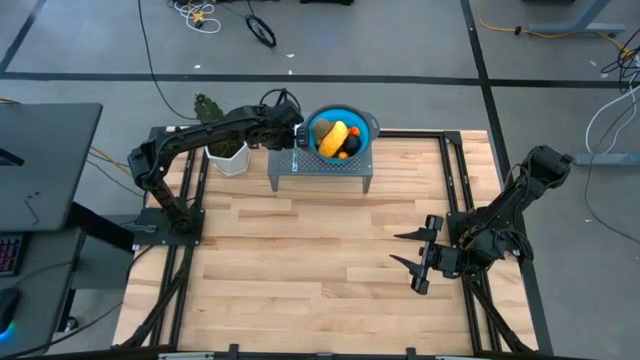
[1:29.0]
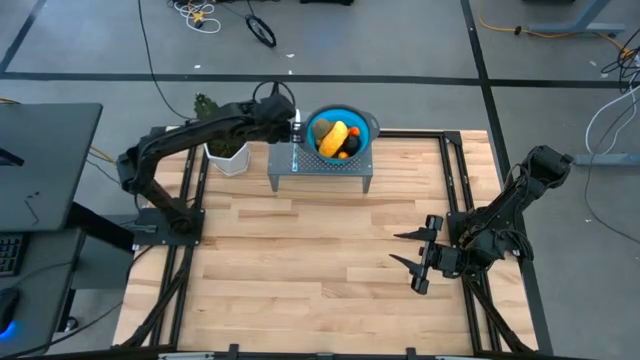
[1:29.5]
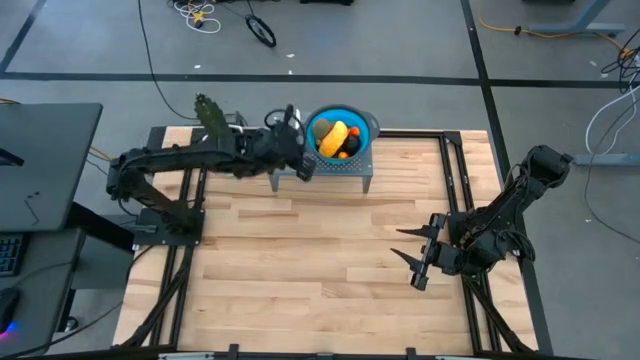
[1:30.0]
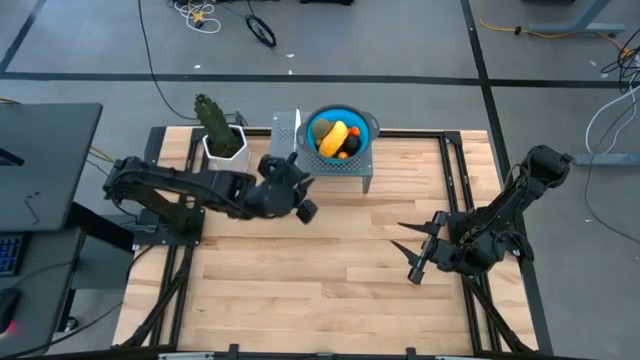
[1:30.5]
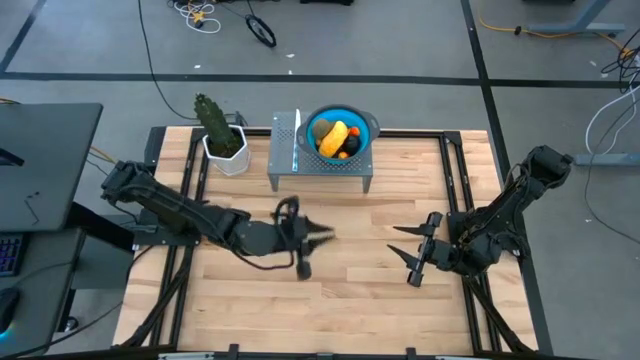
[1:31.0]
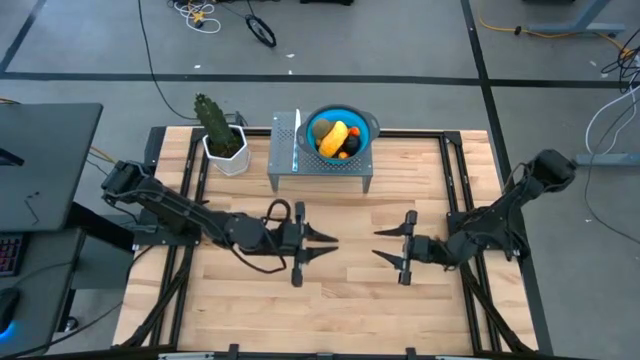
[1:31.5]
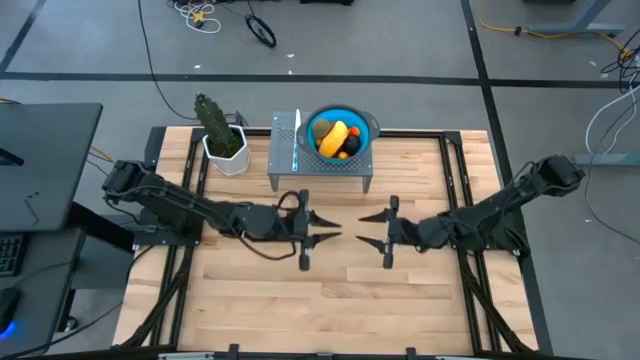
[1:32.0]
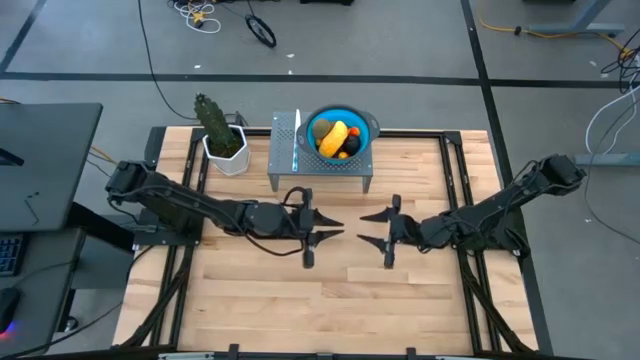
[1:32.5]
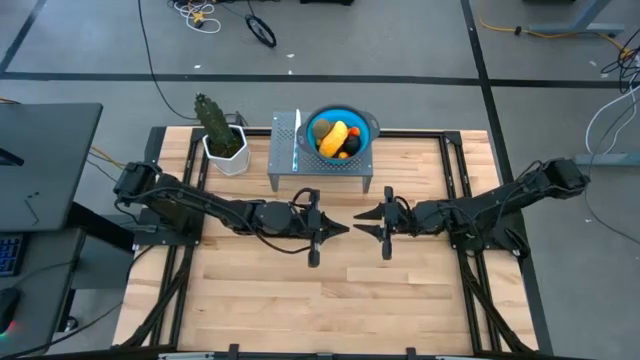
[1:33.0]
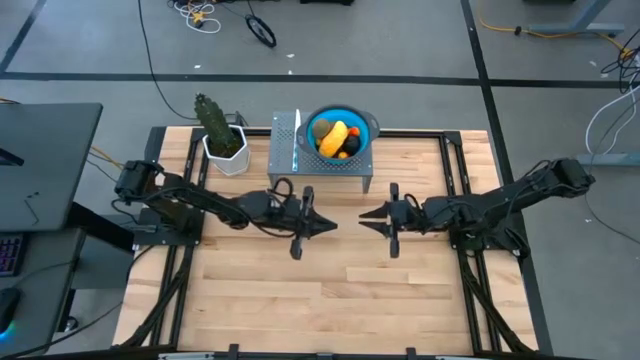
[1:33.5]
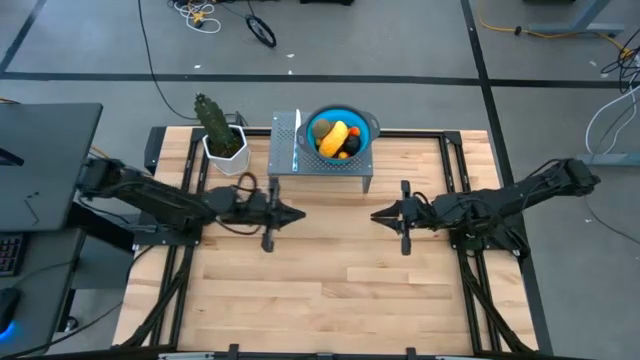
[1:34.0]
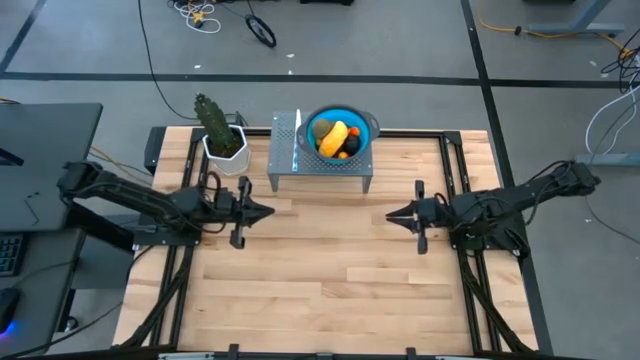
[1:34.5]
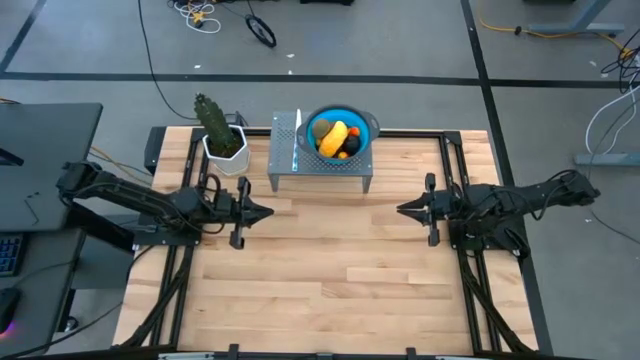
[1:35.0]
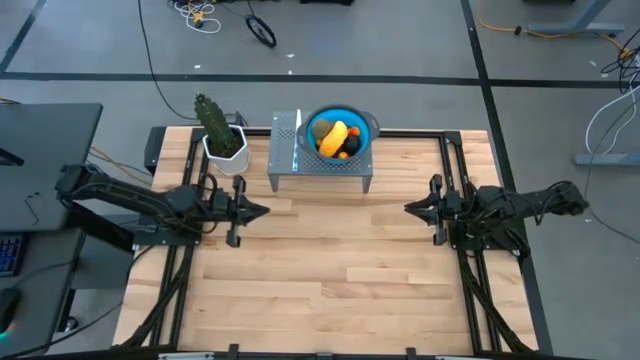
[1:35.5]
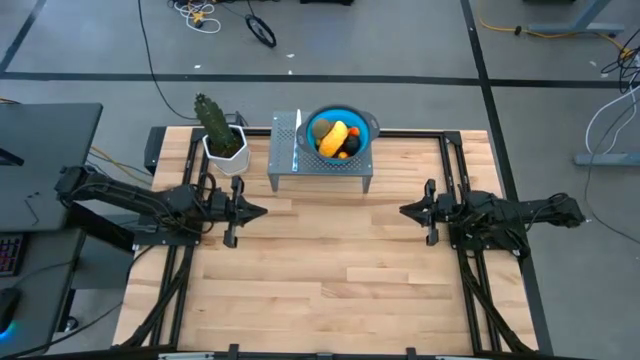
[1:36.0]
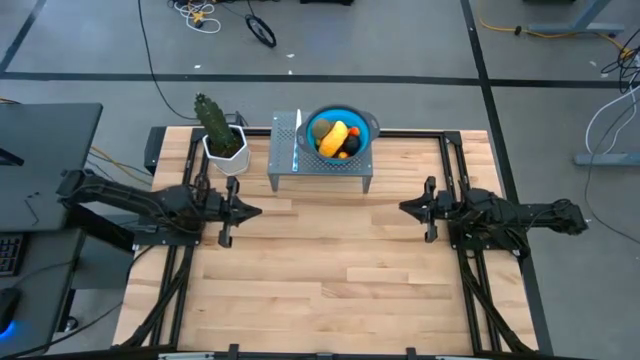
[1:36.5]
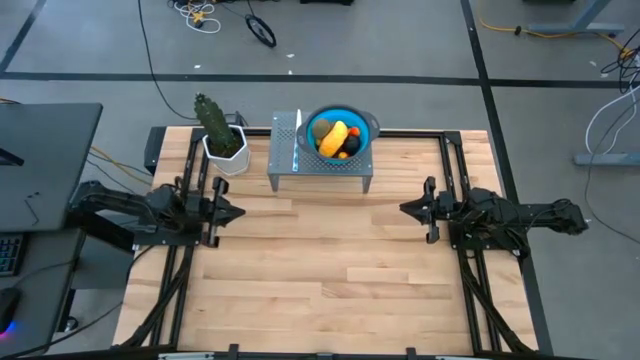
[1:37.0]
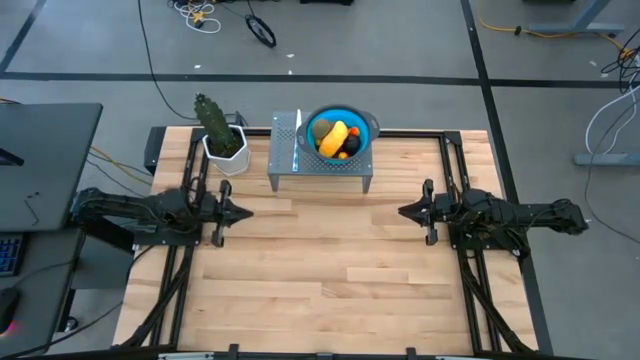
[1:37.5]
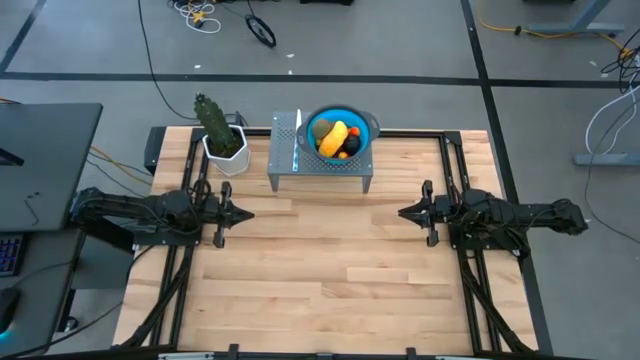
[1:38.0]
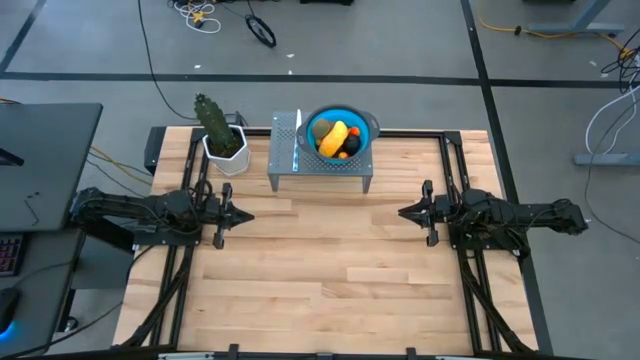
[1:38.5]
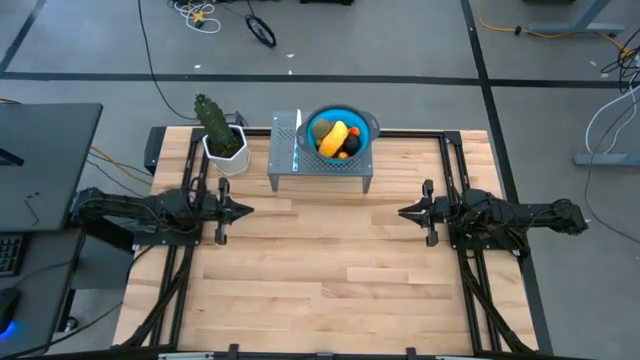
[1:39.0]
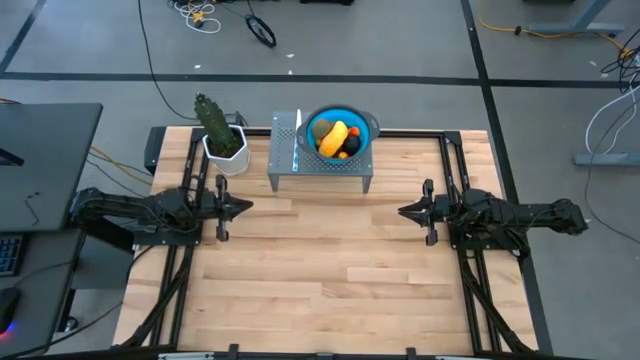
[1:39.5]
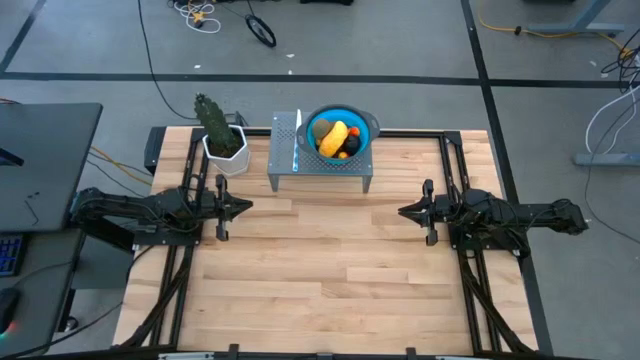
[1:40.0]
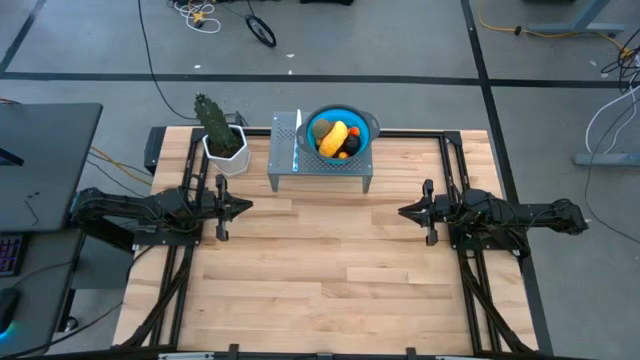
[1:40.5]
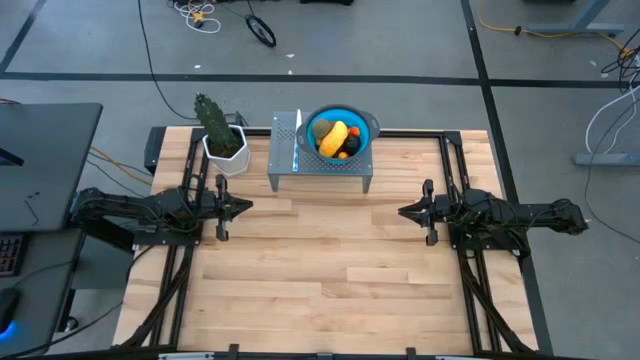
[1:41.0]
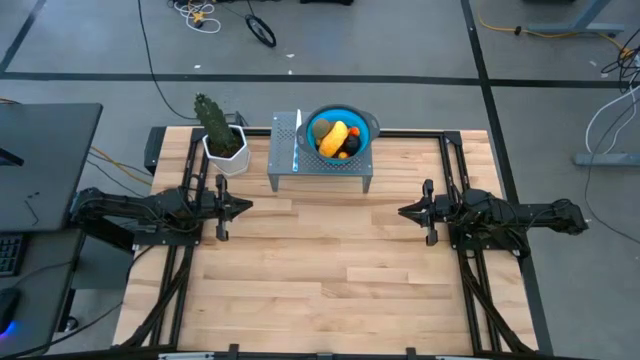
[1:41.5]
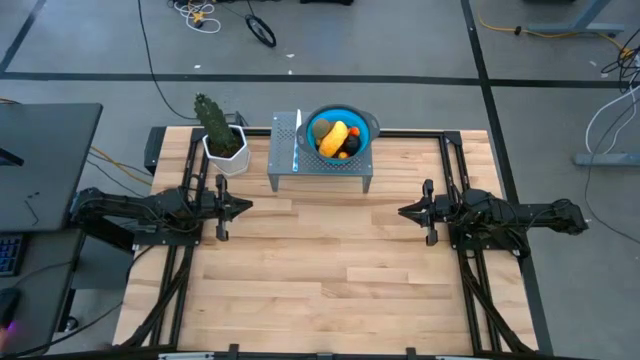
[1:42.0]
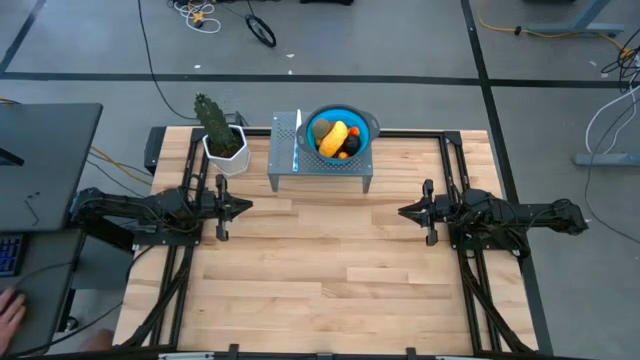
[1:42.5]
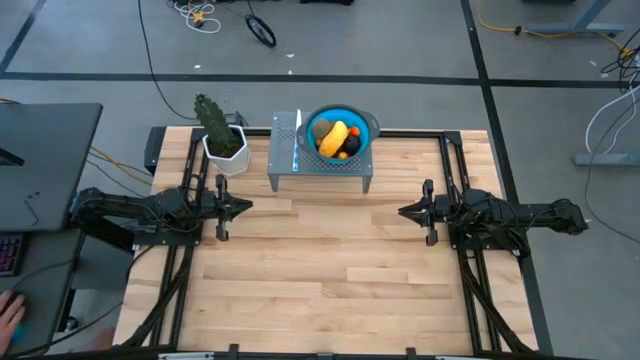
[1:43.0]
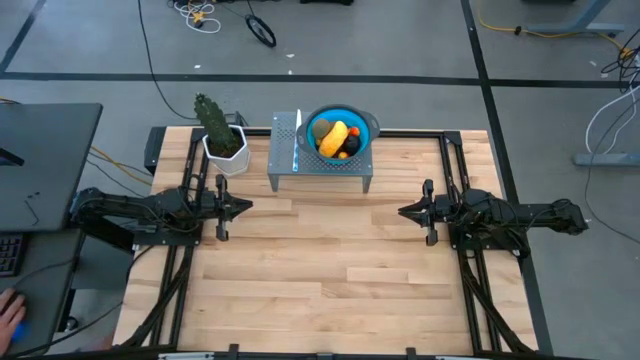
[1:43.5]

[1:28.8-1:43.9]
Task: Pick & Place Fruit
Return to Home Position

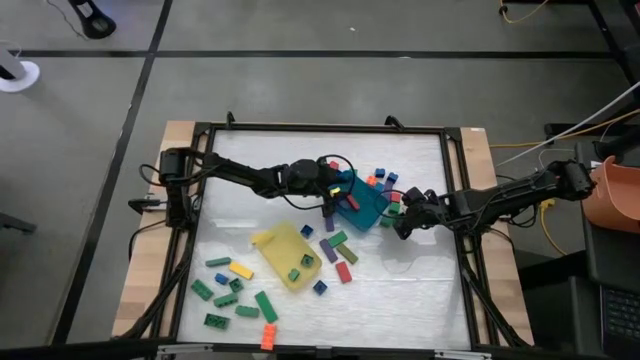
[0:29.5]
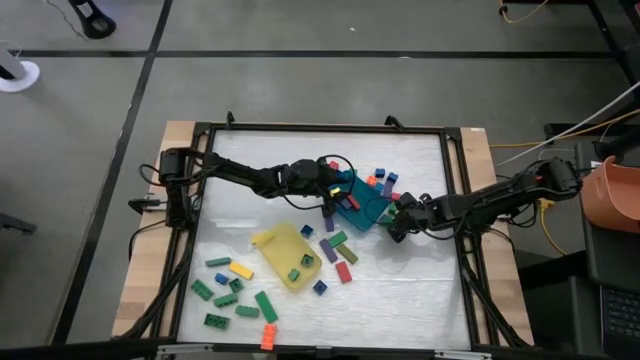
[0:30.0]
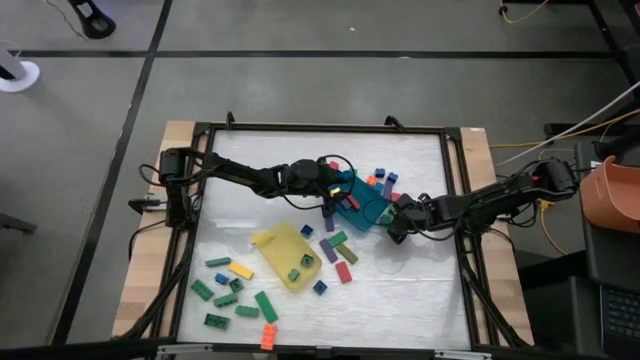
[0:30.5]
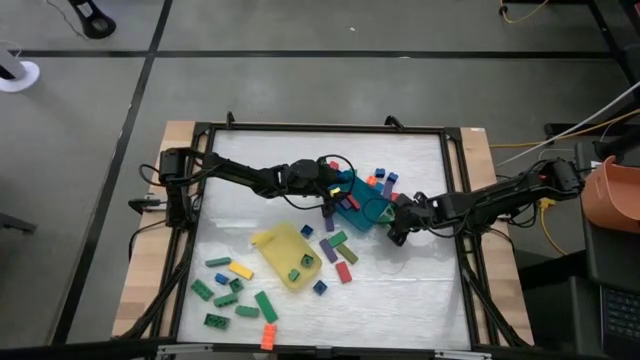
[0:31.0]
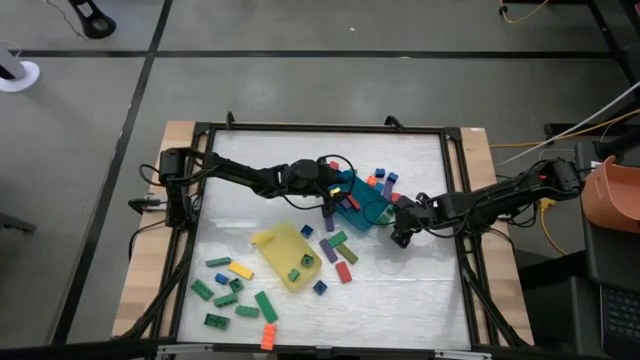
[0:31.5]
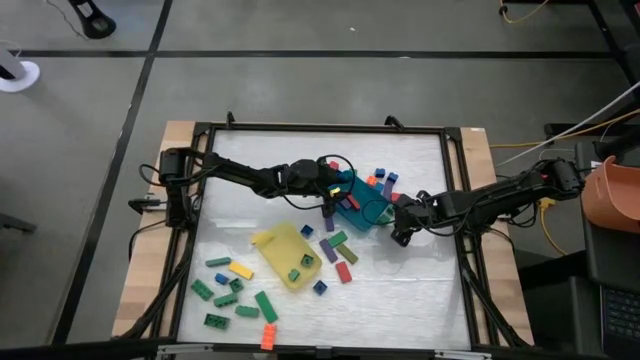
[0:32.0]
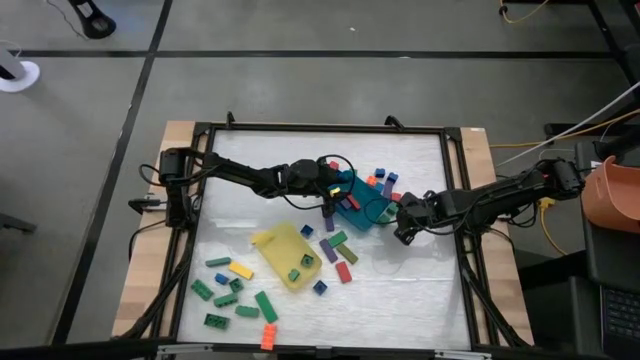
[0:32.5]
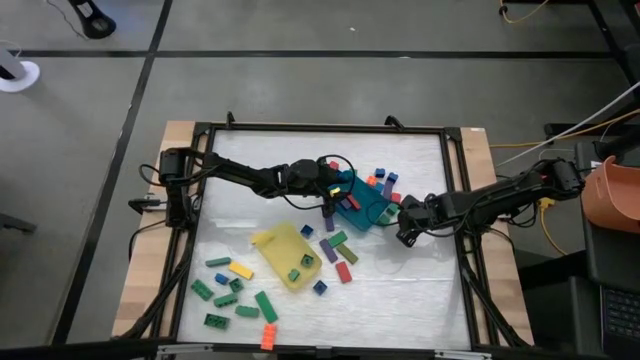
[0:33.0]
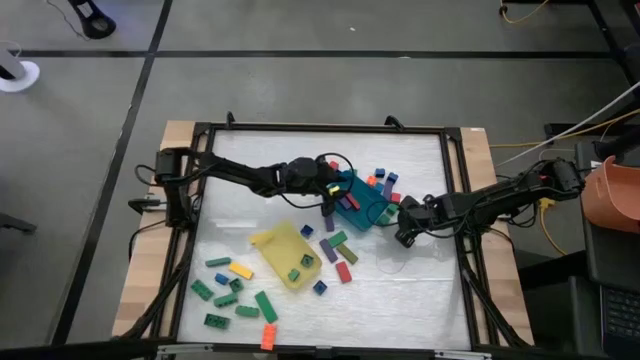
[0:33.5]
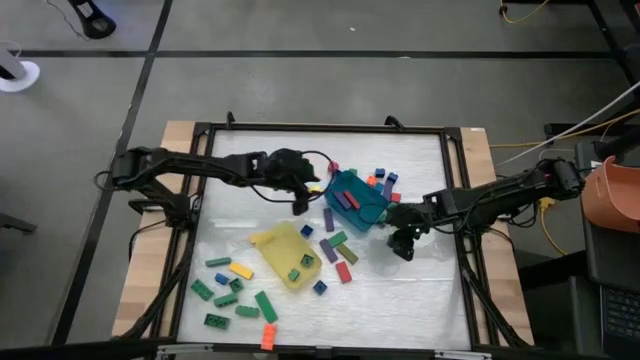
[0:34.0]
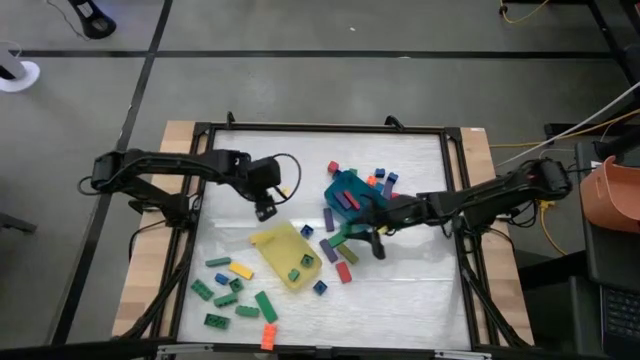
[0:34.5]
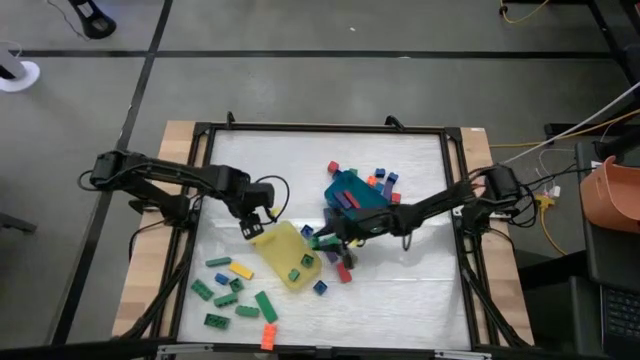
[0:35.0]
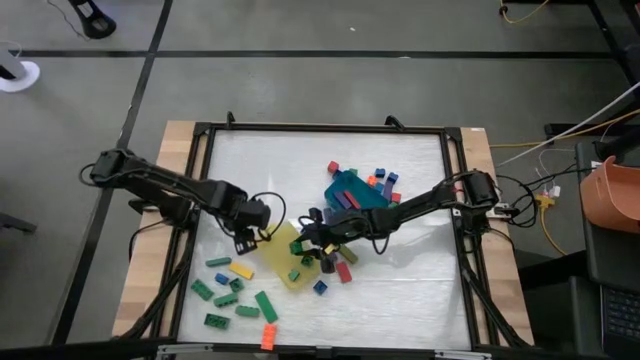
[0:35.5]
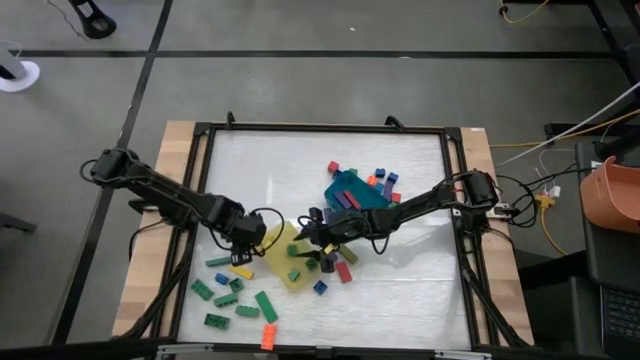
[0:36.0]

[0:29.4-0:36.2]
Task: Sort blocks by size
Put the small green game piece into the yellow bin
